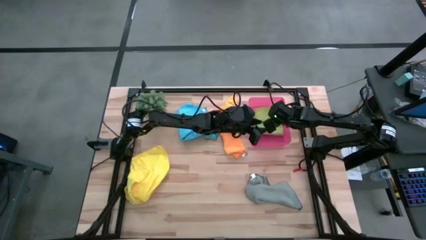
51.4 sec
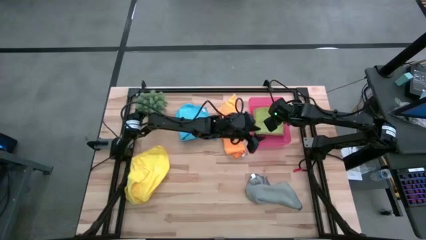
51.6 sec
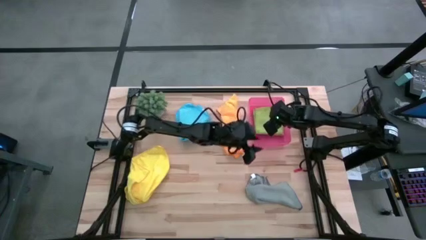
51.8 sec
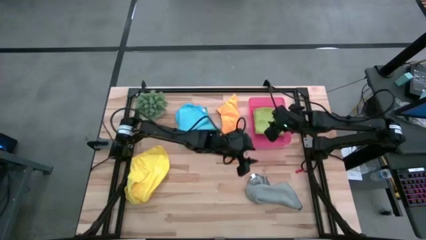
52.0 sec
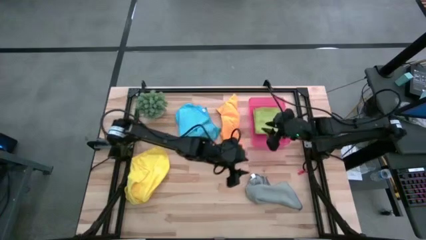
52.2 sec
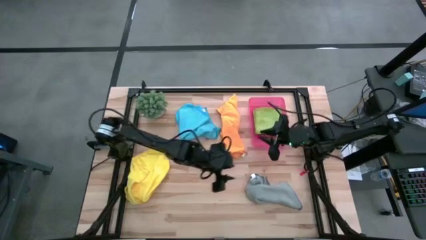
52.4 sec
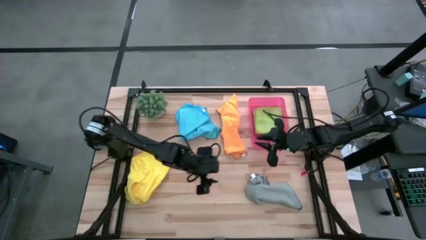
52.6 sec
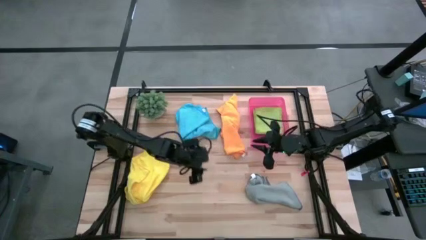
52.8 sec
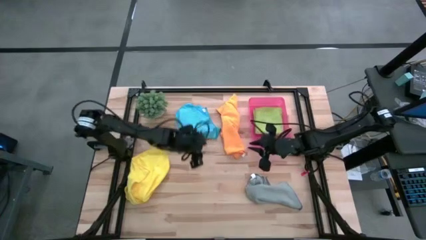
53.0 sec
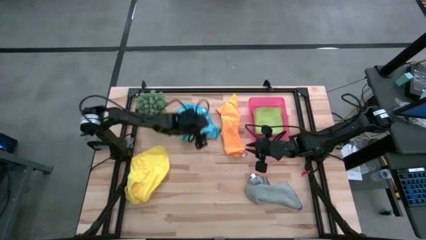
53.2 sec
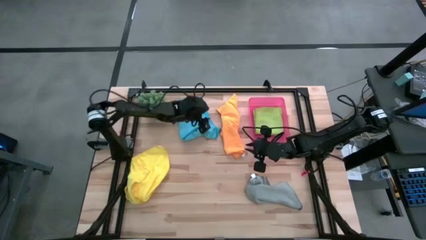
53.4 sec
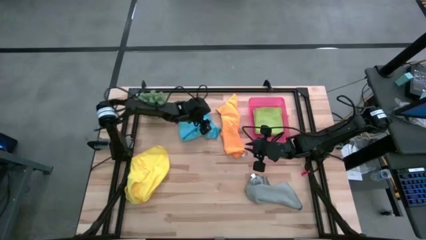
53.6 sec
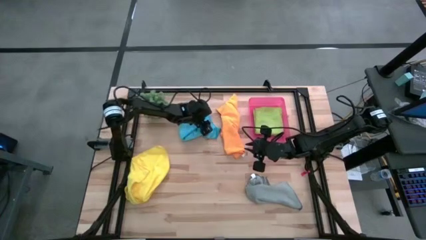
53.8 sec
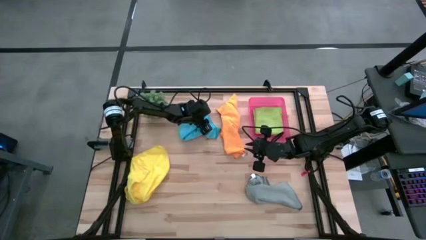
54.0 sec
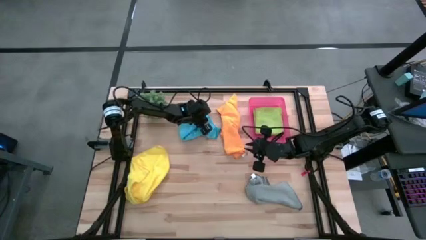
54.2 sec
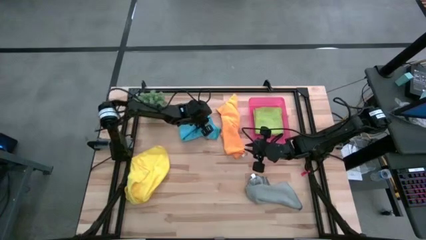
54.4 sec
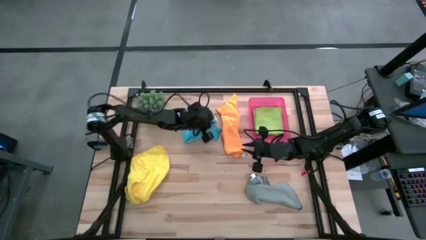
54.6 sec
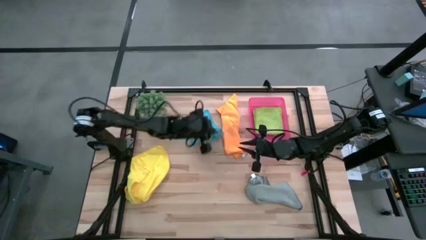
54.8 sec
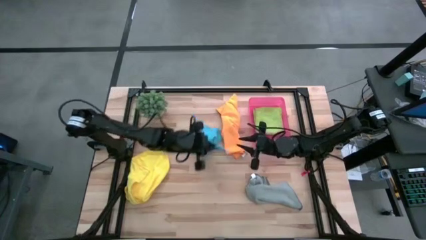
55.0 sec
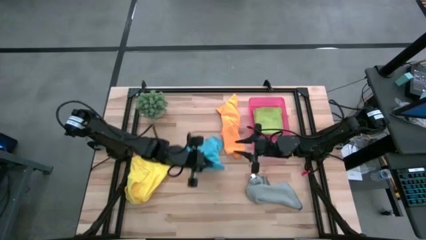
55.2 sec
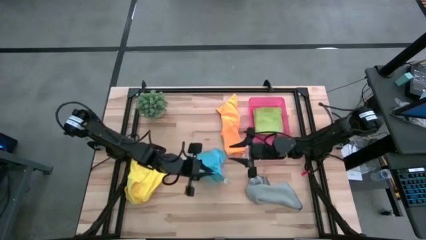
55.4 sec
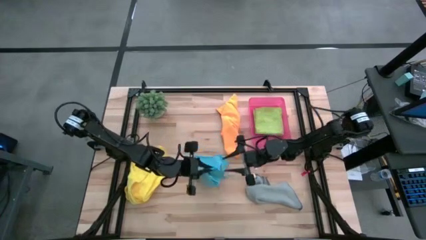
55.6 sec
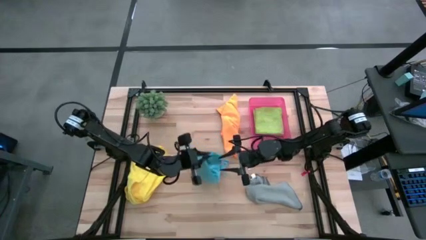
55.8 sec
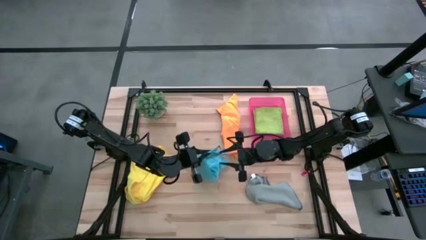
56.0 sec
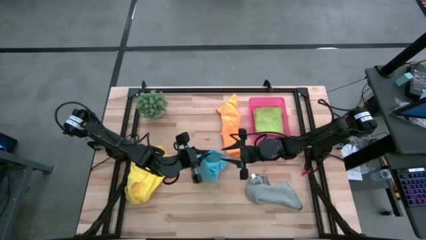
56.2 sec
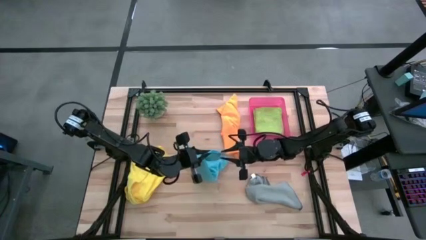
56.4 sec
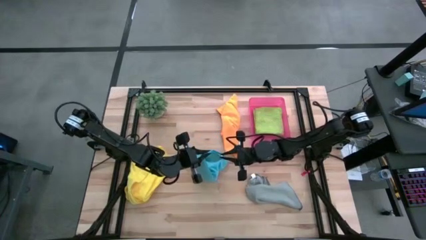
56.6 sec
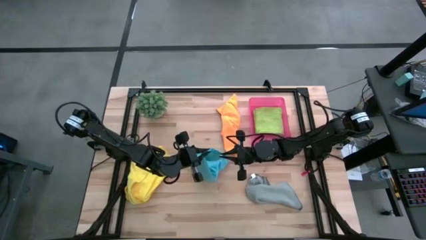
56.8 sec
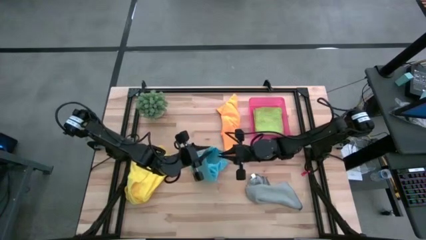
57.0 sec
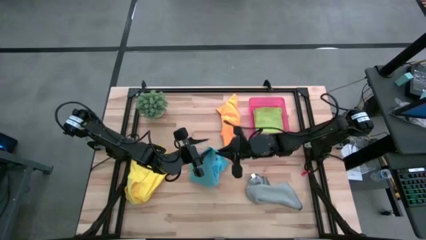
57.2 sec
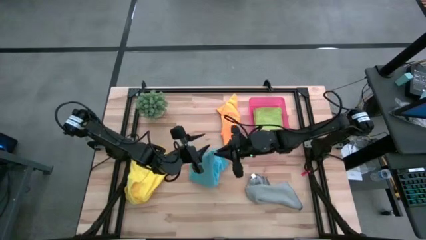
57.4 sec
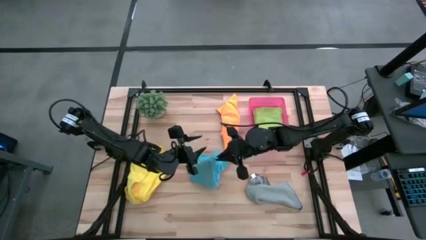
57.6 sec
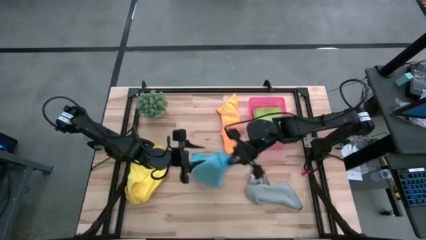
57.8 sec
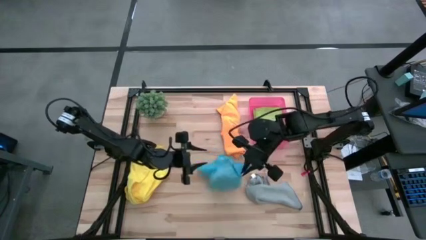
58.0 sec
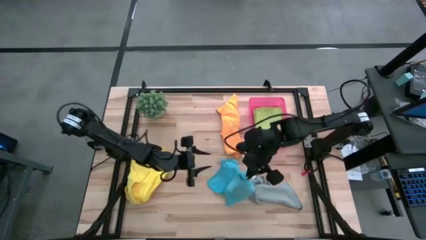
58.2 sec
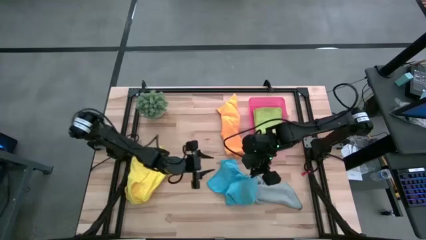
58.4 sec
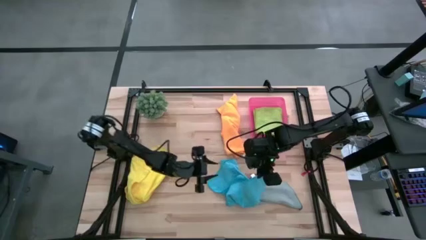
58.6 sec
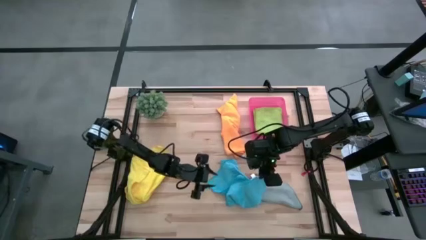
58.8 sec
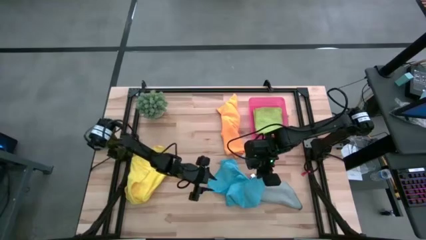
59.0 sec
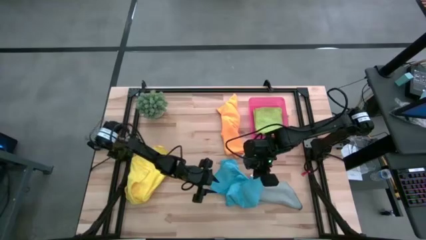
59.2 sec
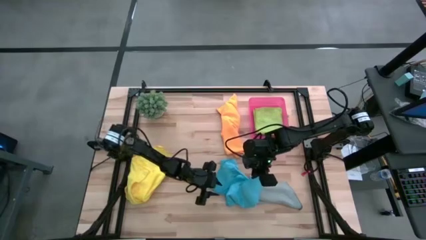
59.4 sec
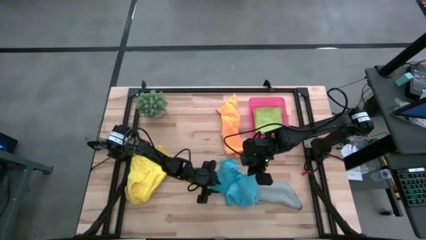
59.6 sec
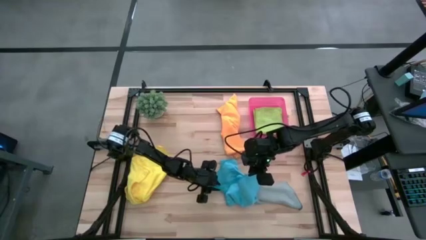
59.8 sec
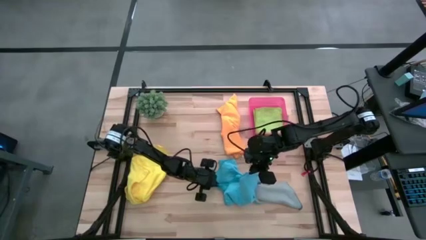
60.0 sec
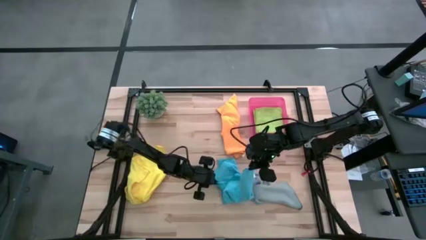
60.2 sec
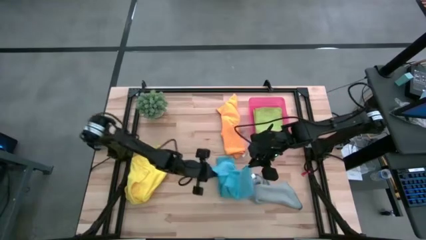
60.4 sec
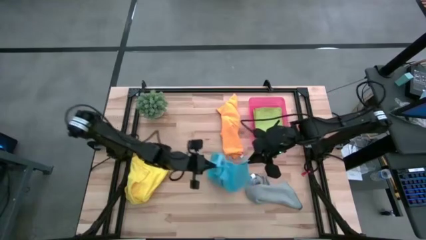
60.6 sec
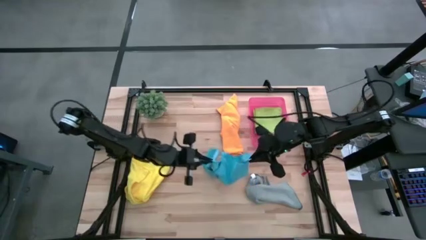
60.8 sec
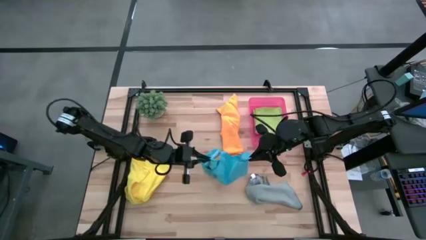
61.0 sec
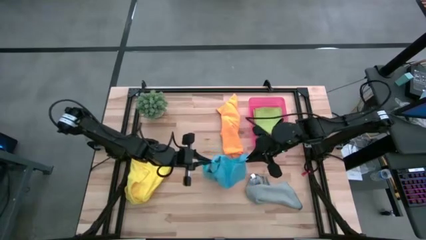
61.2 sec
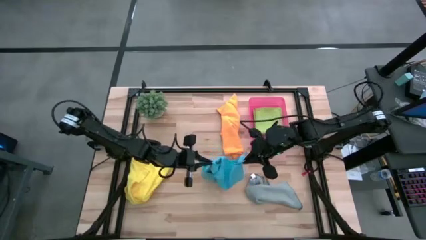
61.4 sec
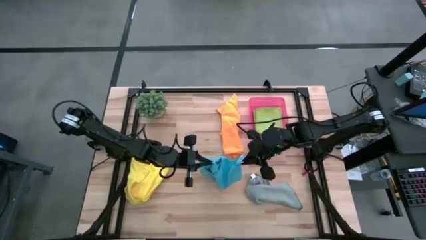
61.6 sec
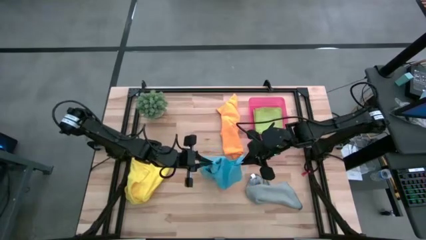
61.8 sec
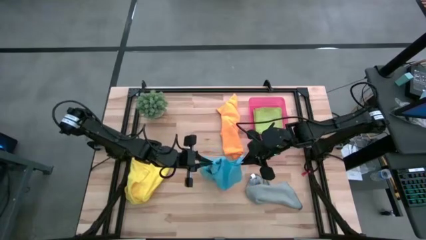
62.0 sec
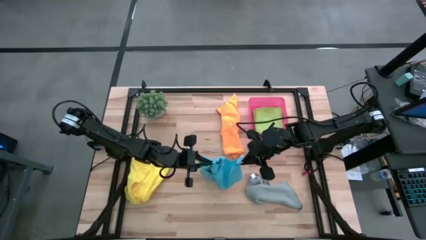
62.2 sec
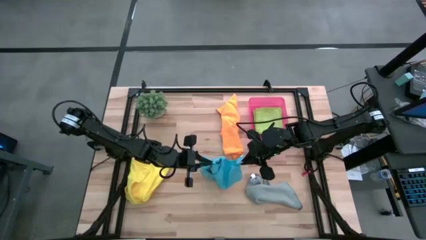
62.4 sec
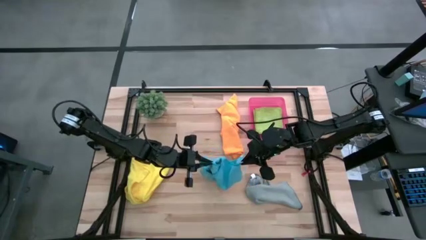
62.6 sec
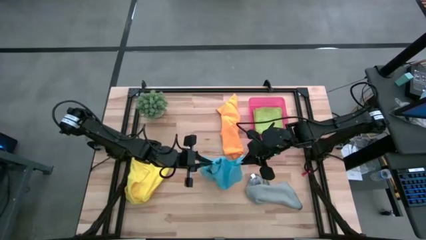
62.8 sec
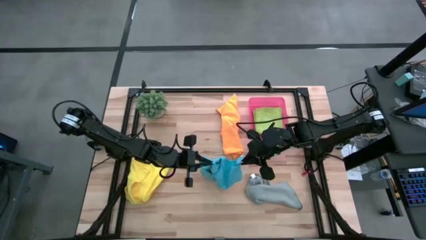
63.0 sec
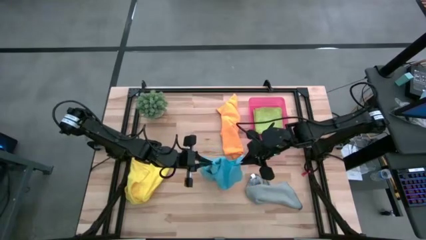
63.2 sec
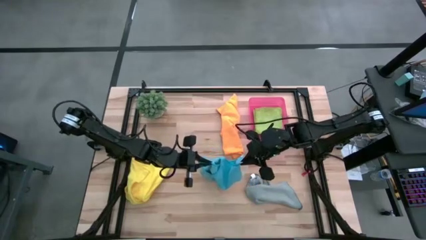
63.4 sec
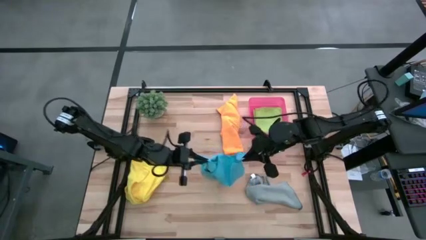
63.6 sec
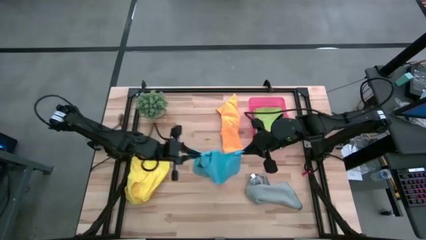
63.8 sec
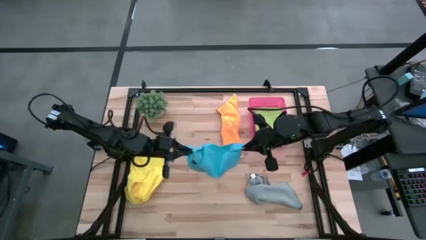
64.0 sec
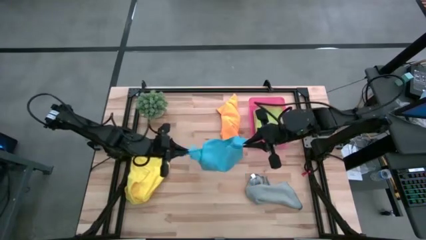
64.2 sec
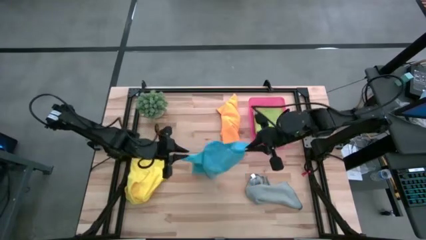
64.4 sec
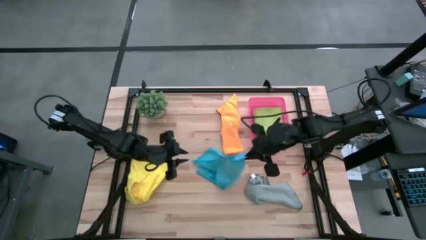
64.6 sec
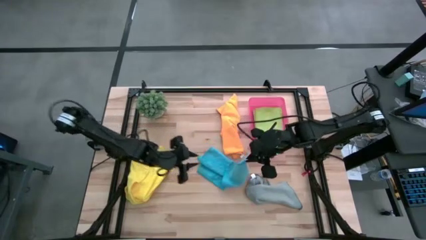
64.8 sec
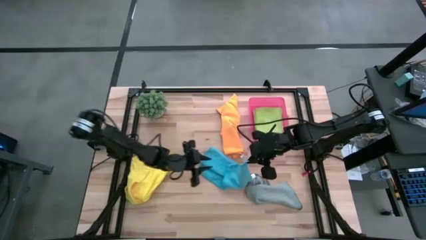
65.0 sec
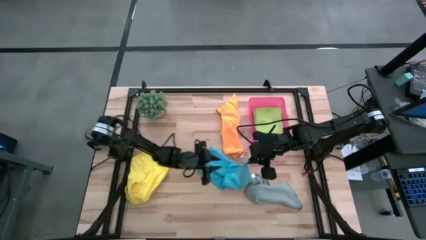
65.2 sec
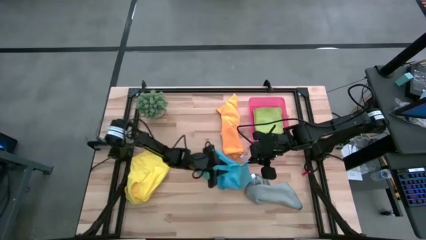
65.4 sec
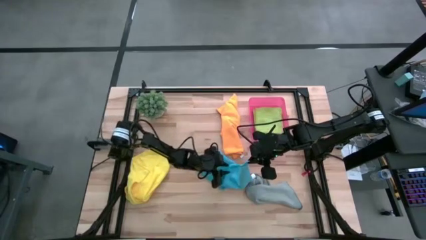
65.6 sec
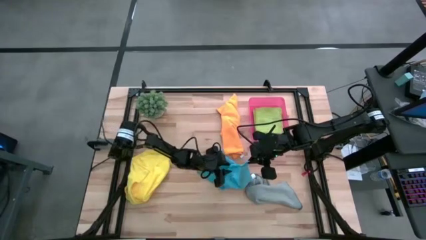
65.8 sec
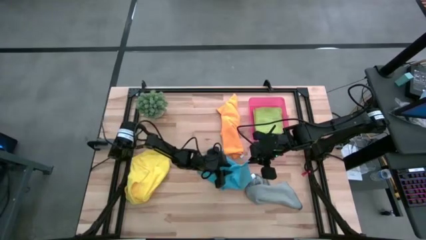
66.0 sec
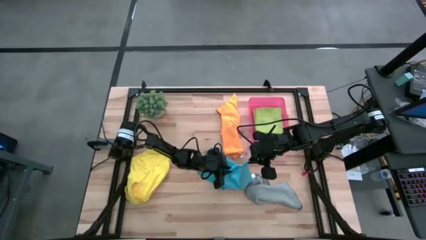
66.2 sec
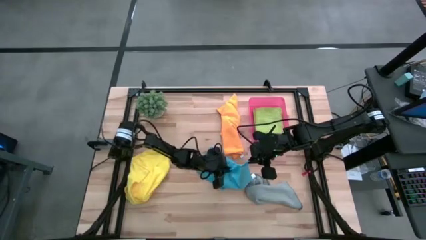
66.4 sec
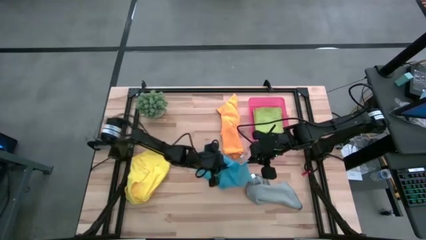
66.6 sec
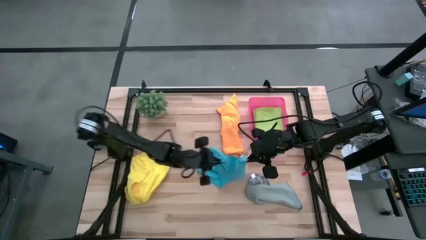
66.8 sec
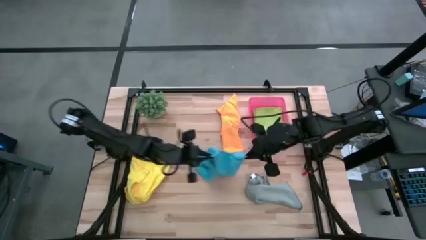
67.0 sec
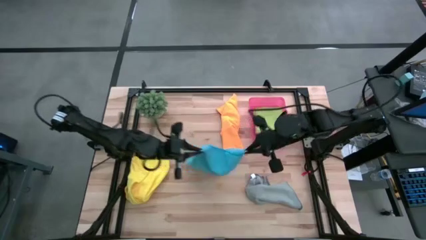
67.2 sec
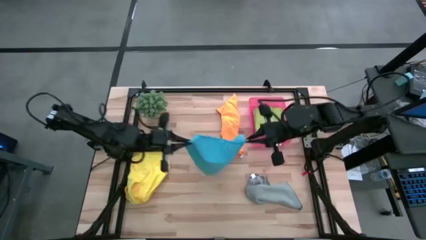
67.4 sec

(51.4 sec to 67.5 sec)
Task: Fold microfiber towels
Fold the blue microfiber cloth
